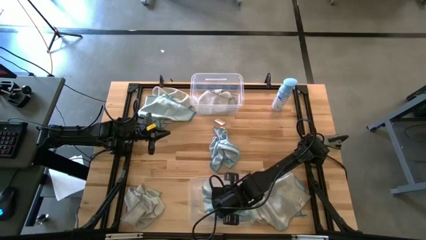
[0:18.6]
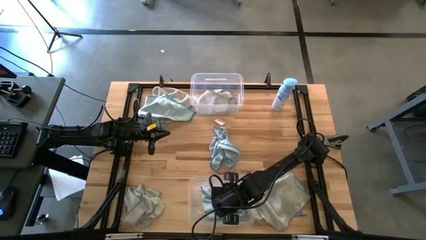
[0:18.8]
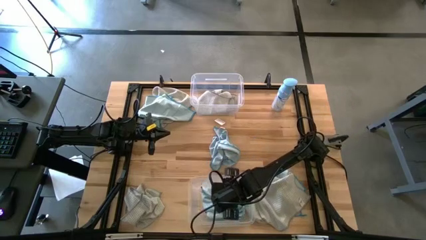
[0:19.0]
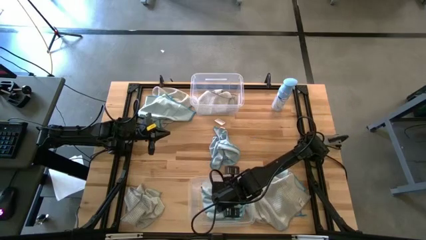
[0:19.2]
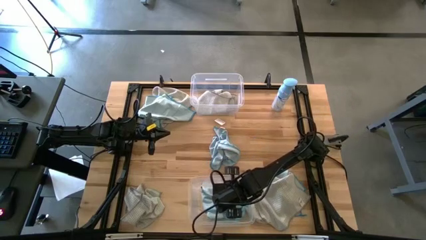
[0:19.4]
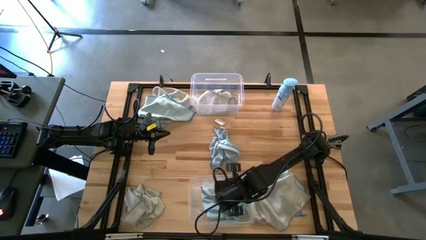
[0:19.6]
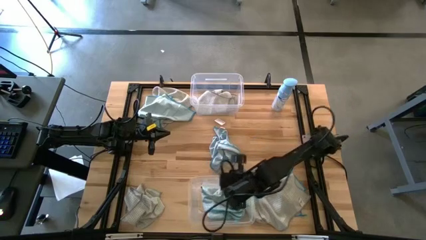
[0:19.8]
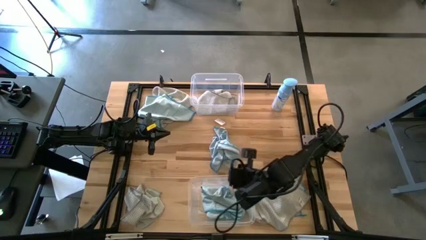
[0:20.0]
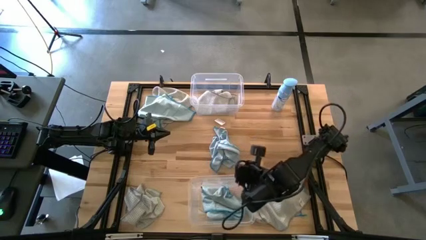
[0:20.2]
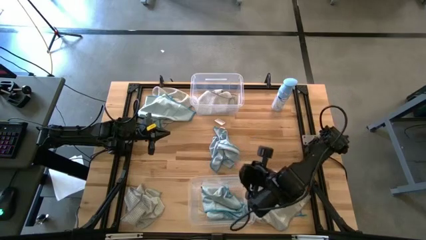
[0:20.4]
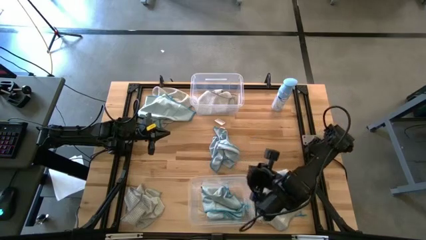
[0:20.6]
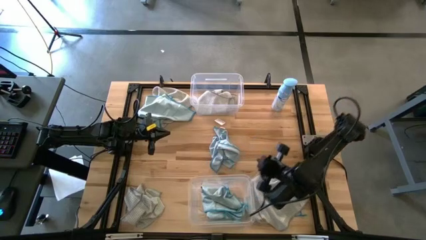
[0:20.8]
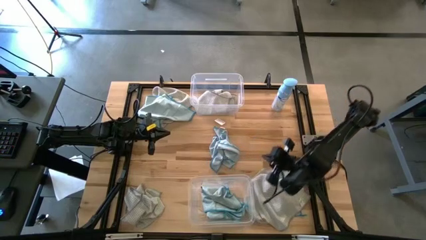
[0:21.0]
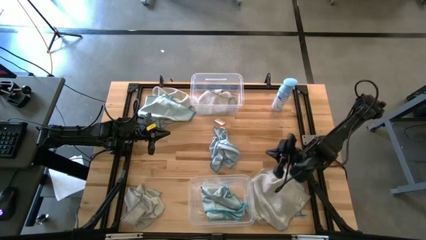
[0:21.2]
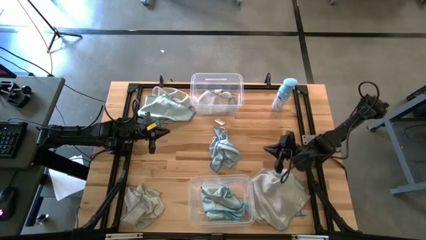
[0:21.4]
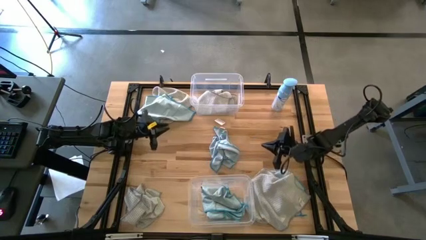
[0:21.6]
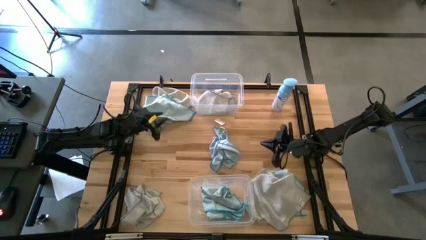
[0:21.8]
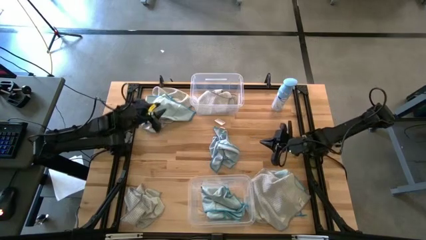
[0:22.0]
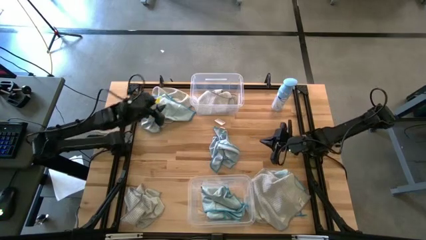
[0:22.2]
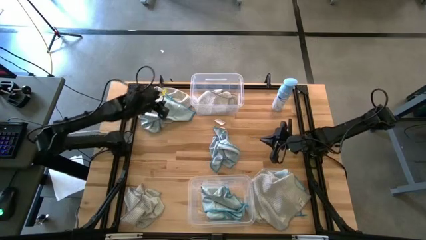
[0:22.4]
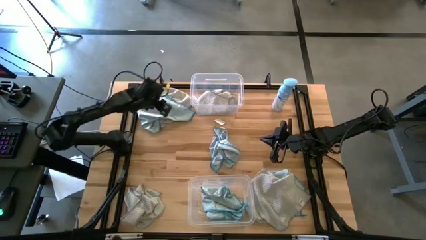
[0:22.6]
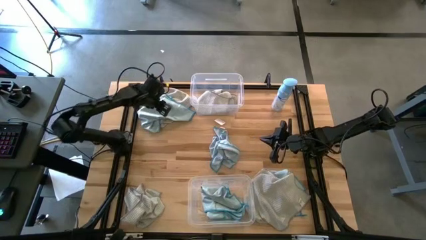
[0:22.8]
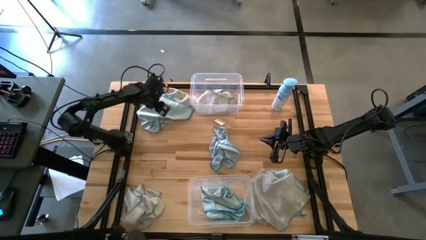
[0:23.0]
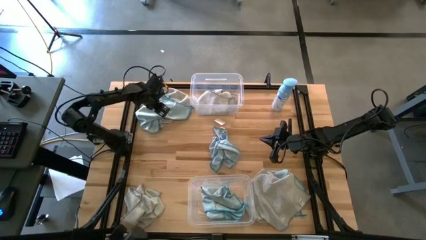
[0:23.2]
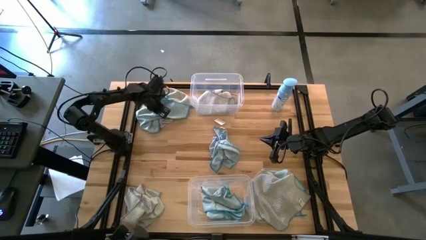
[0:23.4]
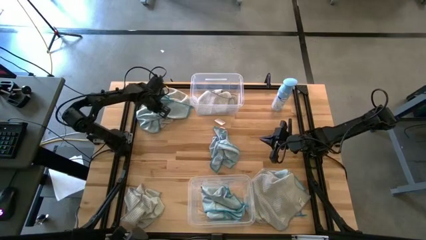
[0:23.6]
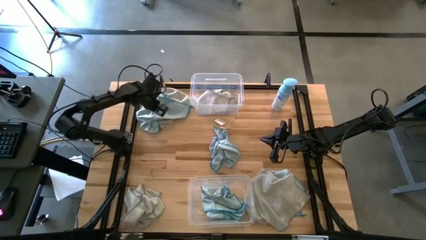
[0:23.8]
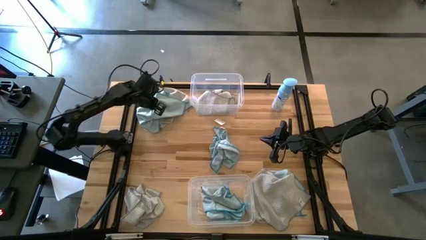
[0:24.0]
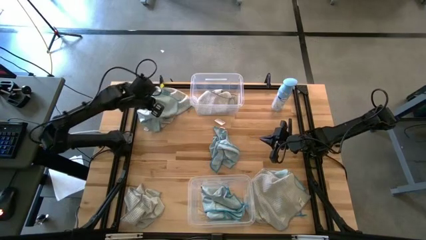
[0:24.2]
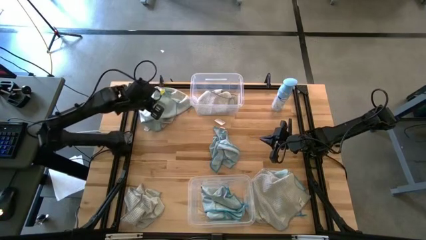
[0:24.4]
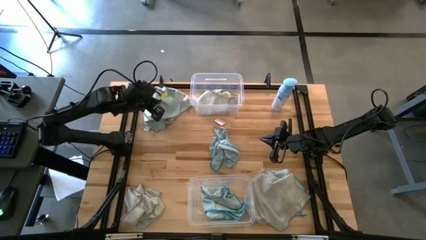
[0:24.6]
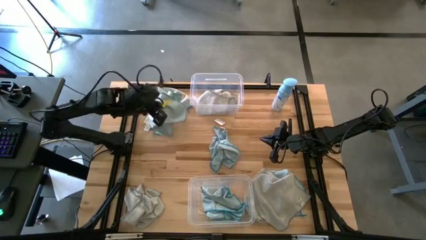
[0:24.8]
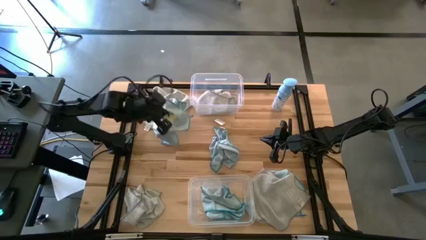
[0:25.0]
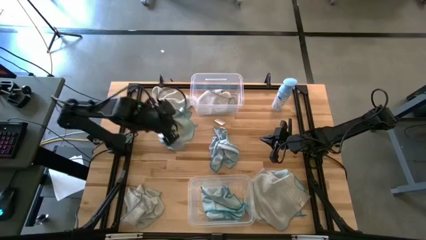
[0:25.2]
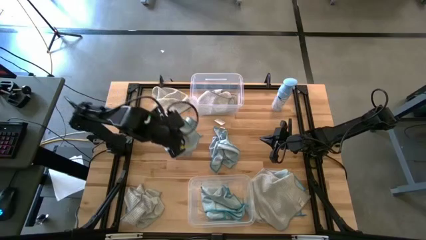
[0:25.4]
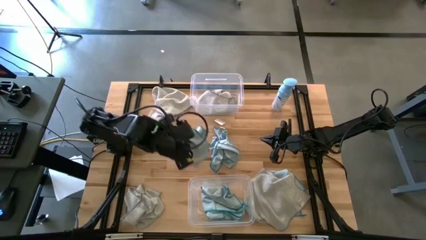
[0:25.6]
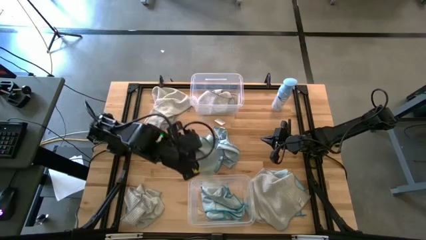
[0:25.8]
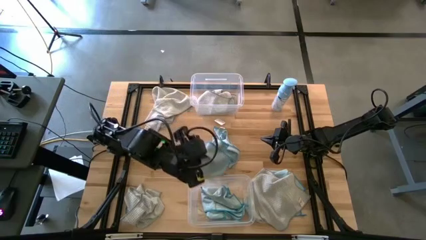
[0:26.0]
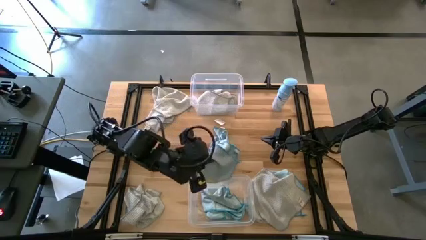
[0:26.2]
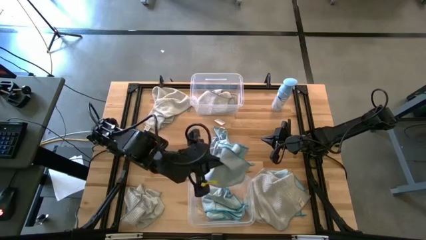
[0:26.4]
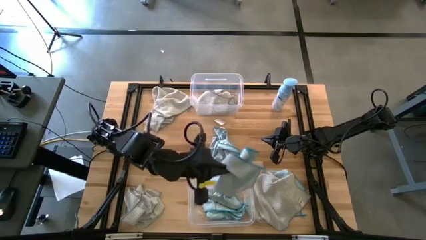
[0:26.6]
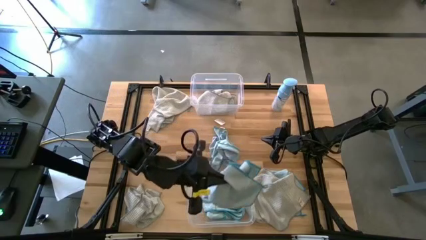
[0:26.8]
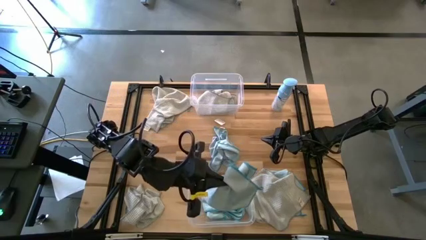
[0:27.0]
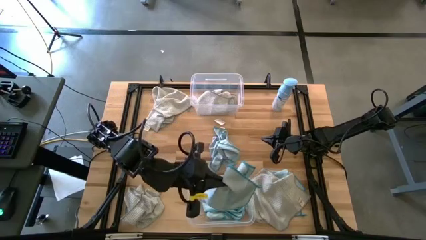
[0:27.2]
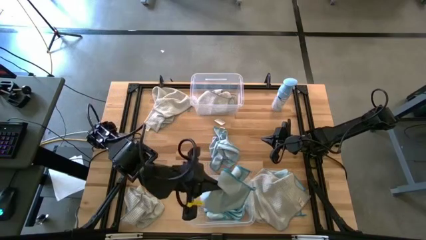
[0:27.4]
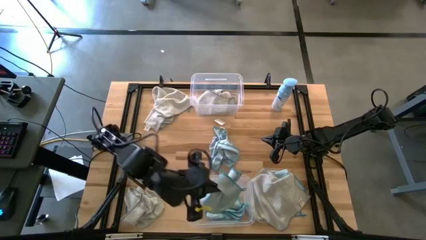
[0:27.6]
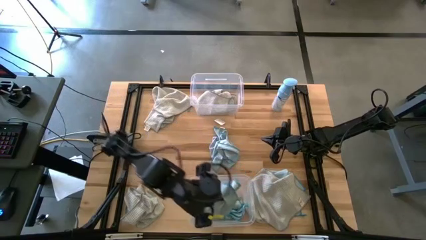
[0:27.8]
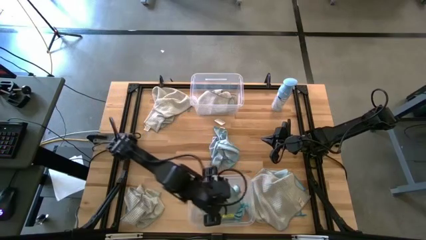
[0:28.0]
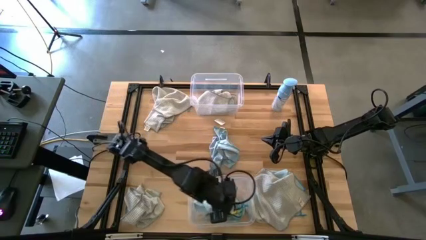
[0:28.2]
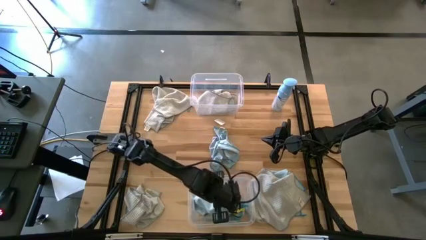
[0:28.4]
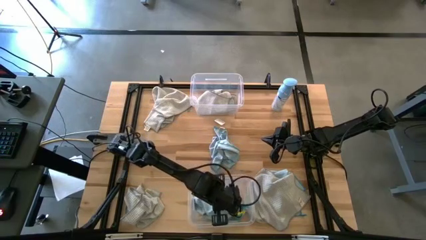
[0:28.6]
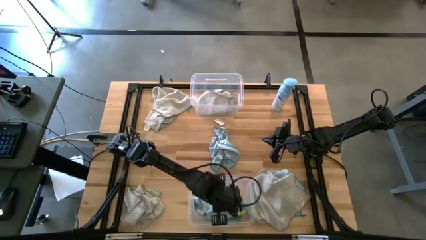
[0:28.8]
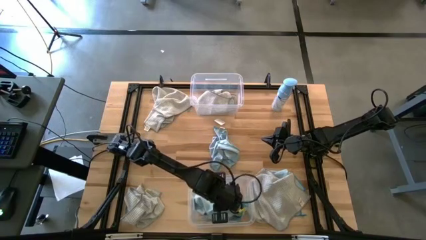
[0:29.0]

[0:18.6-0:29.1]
Task: Sort microfiber towel by color & place in baskets
Put the top left blue towel into the bottom transparent bin

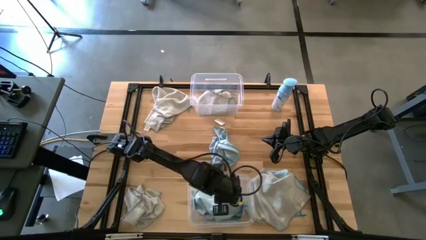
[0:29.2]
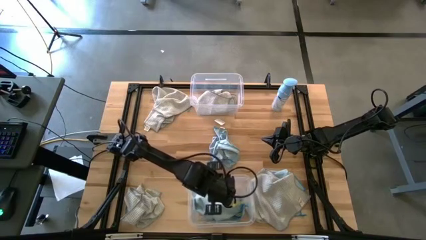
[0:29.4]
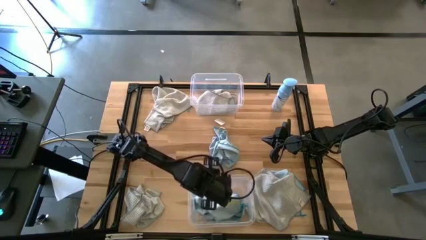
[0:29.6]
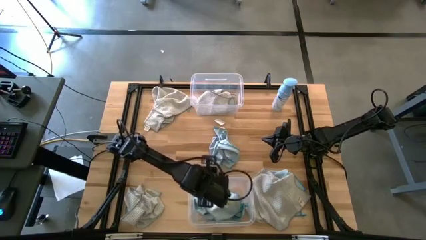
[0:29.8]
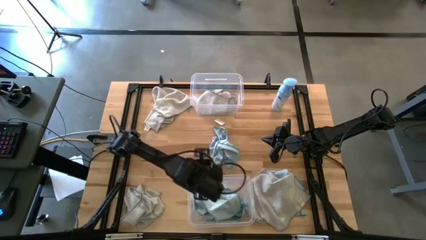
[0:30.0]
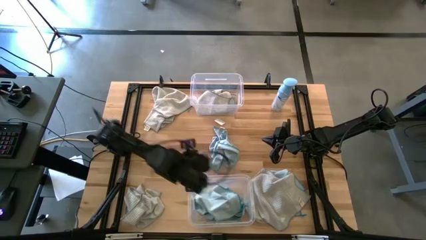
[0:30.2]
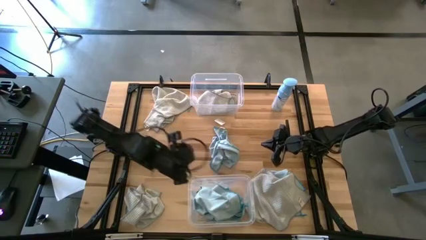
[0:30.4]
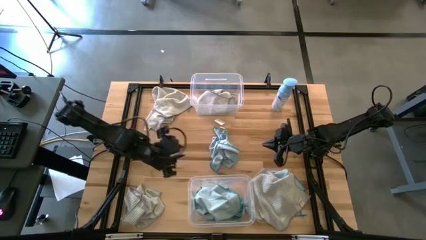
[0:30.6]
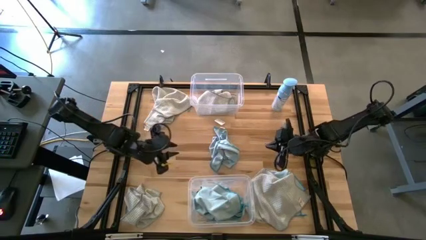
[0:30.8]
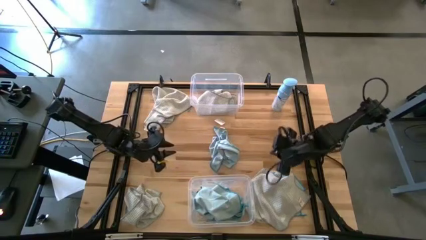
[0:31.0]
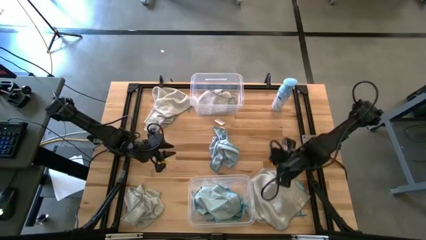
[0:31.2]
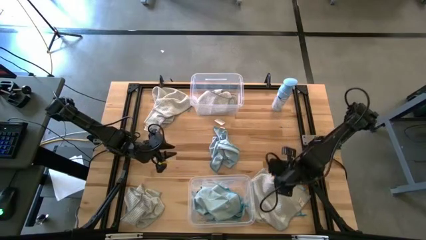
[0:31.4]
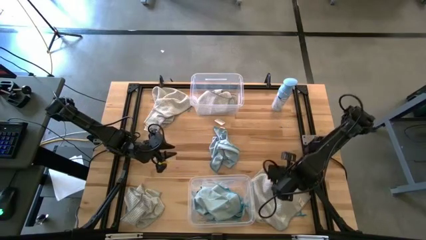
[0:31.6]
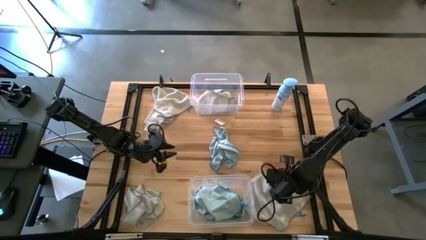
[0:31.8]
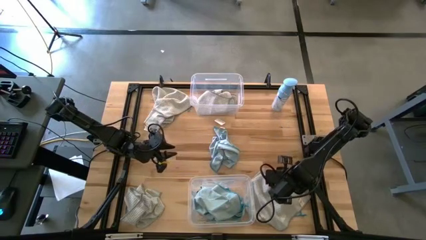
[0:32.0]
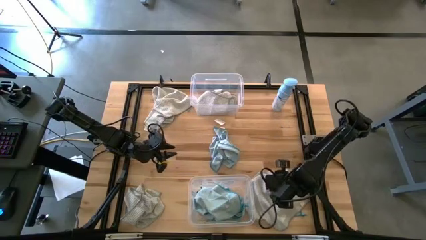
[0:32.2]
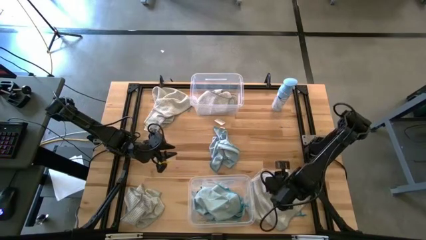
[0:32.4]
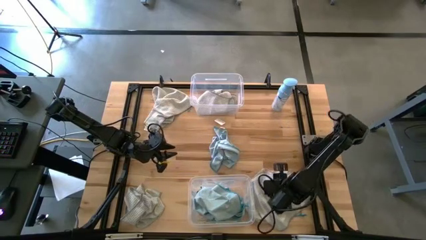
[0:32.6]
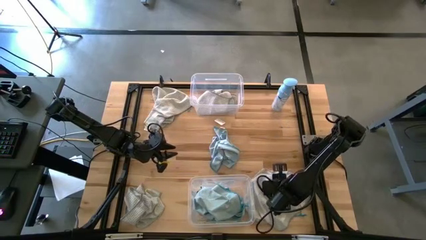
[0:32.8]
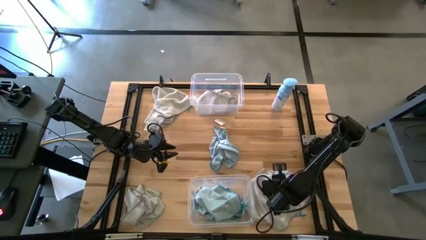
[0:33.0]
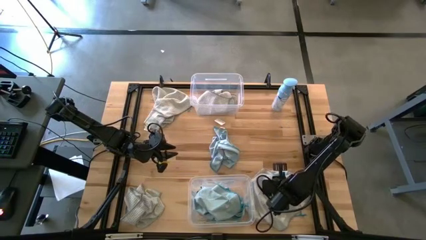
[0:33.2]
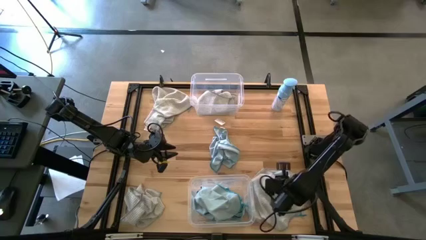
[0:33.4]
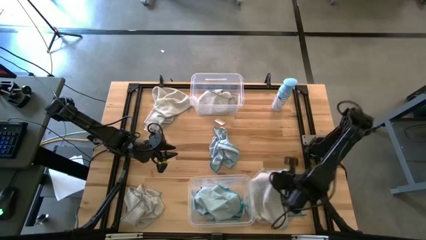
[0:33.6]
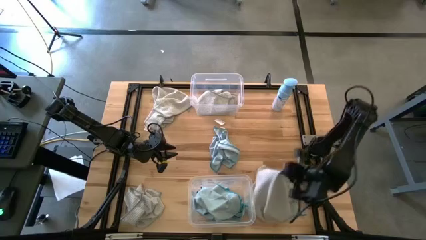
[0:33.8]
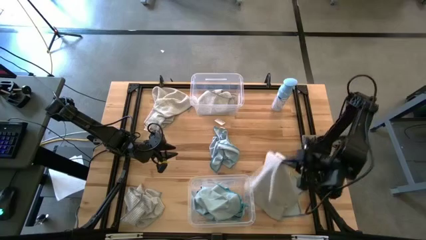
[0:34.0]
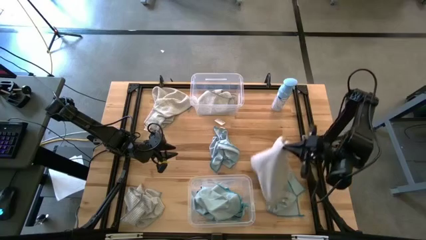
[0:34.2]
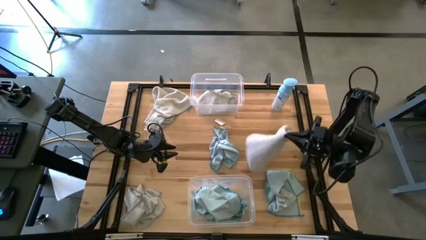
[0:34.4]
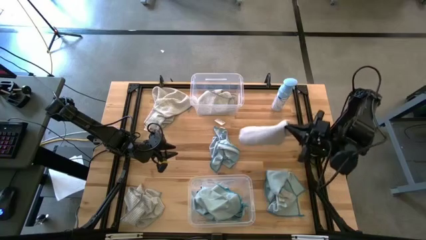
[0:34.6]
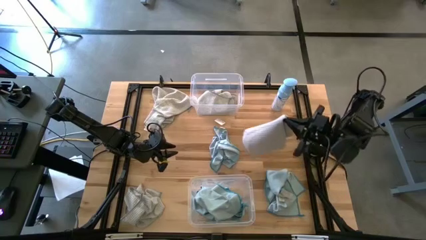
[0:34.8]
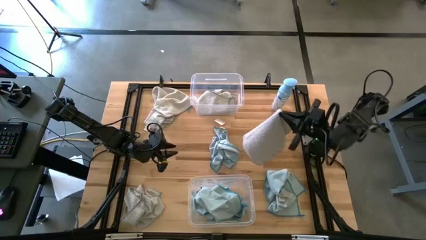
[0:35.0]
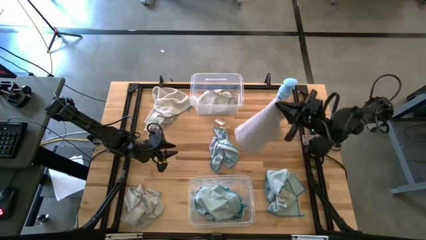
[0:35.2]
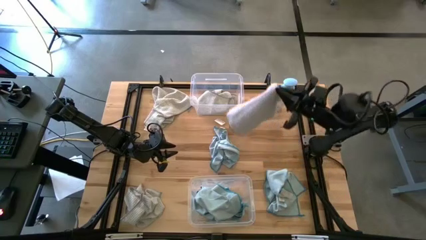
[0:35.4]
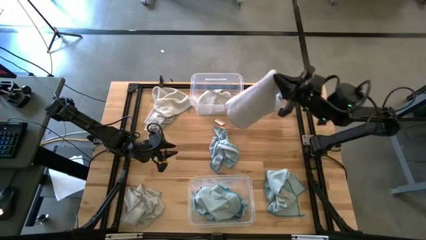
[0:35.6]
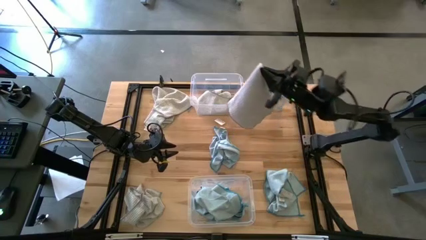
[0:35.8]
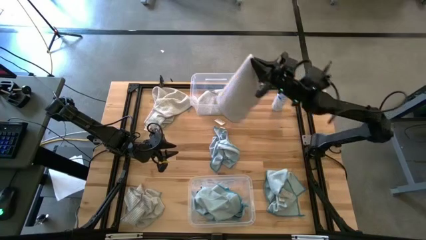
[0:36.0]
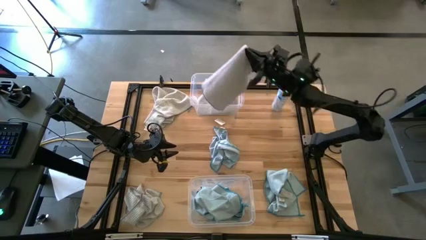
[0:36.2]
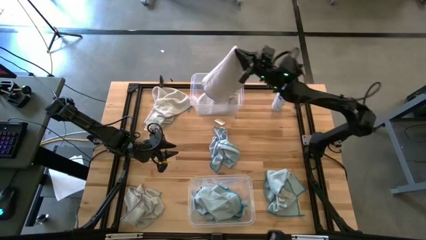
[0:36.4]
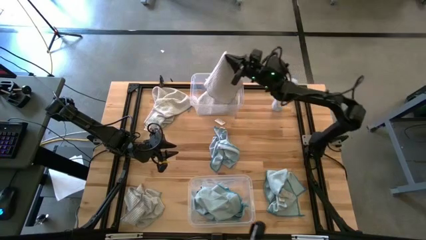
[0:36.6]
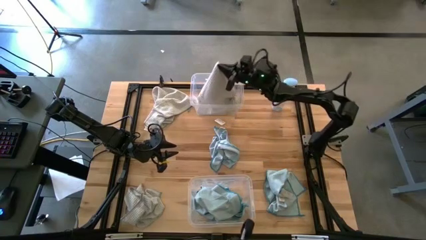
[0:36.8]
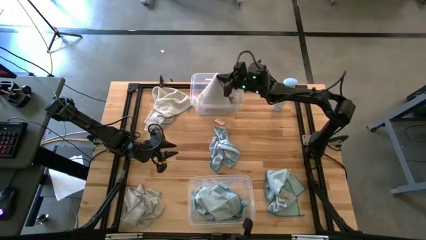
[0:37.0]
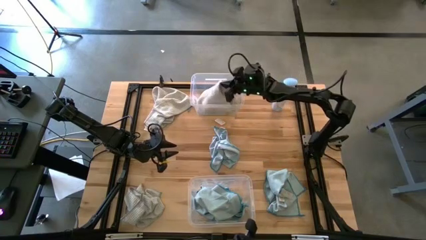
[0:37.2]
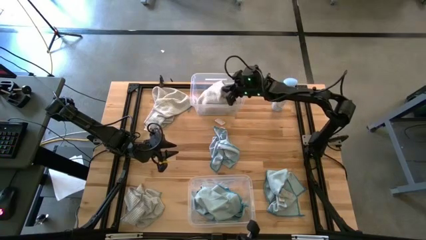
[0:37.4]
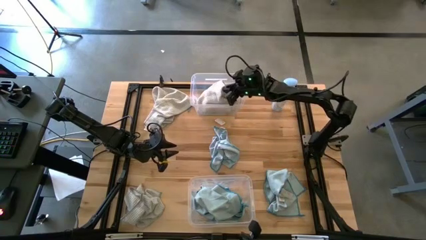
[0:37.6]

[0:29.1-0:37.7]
Put the bottom right white towel into the top transparent bin
